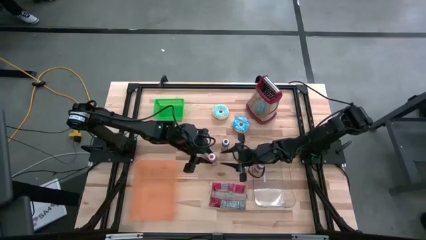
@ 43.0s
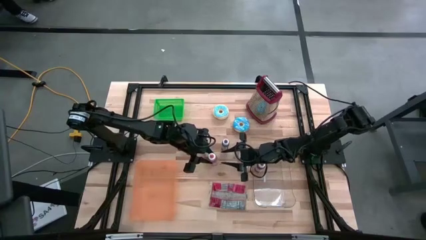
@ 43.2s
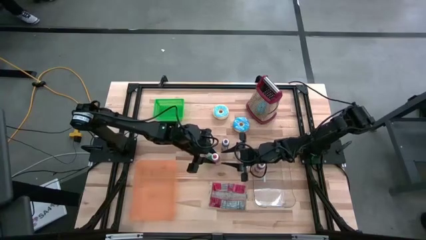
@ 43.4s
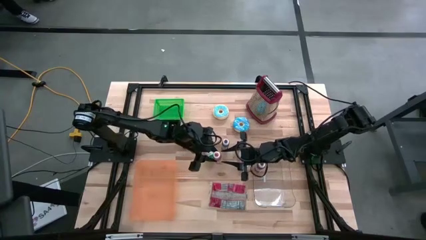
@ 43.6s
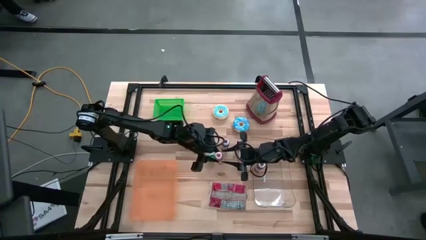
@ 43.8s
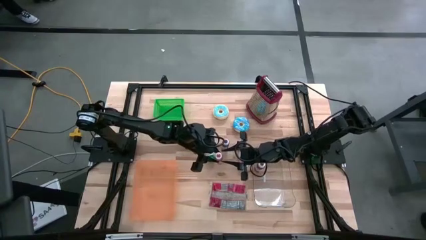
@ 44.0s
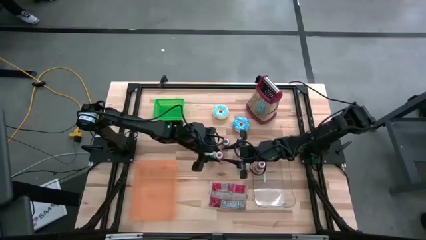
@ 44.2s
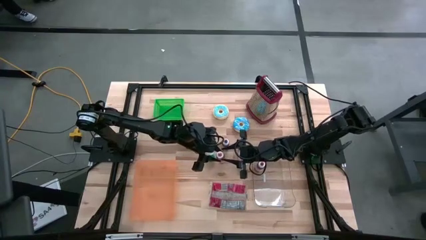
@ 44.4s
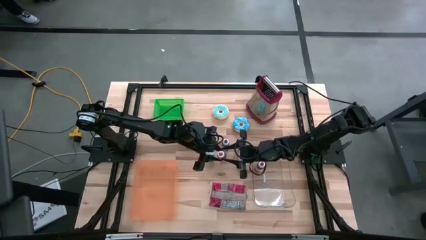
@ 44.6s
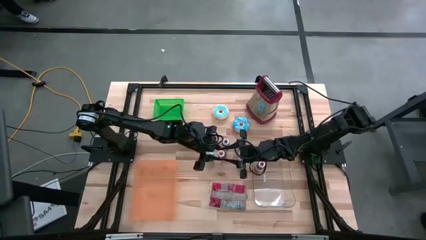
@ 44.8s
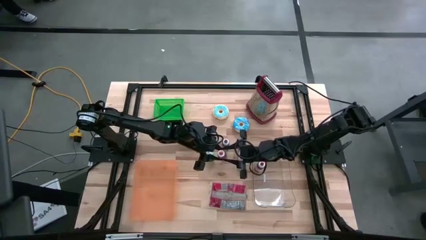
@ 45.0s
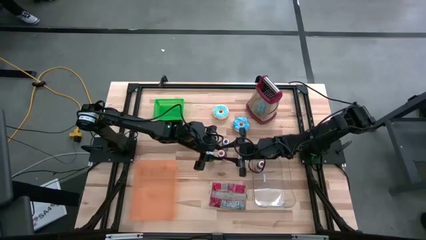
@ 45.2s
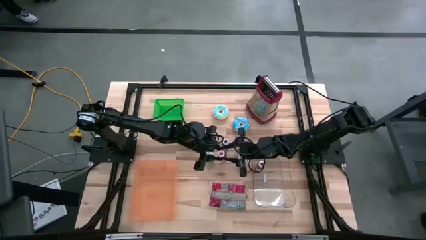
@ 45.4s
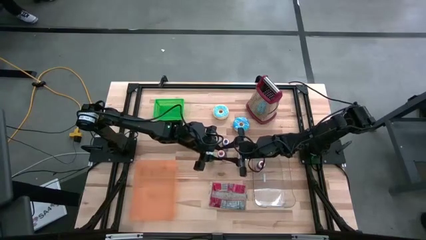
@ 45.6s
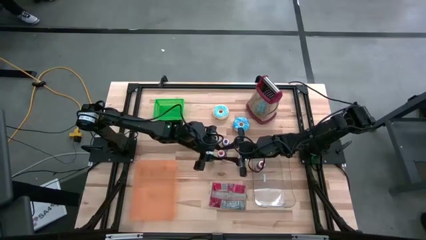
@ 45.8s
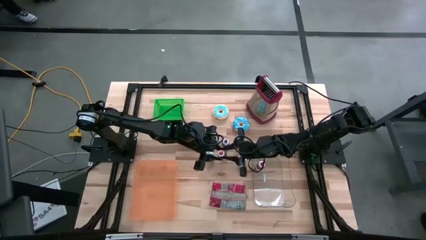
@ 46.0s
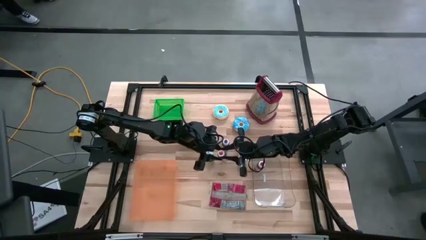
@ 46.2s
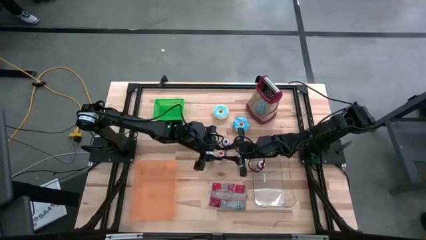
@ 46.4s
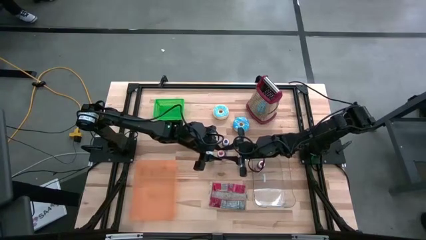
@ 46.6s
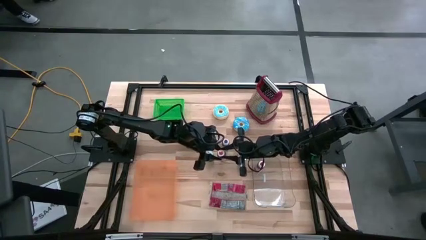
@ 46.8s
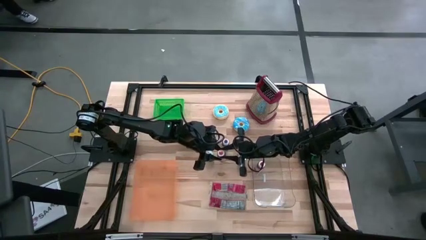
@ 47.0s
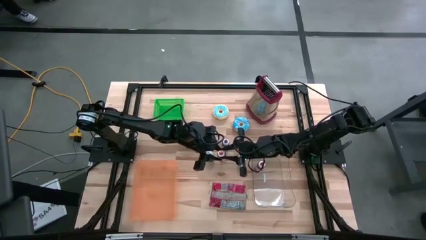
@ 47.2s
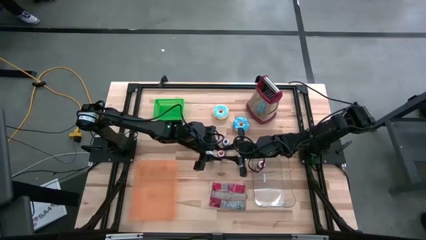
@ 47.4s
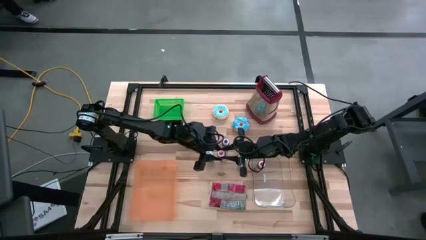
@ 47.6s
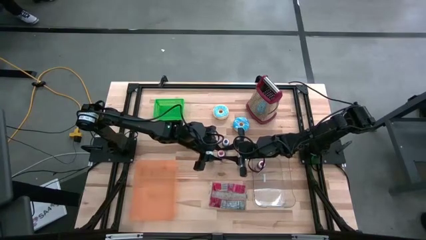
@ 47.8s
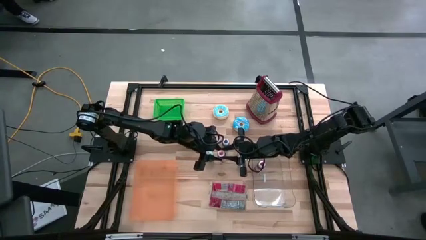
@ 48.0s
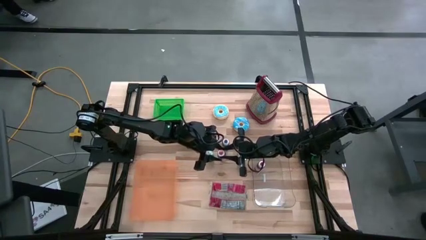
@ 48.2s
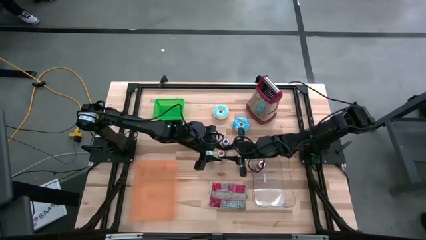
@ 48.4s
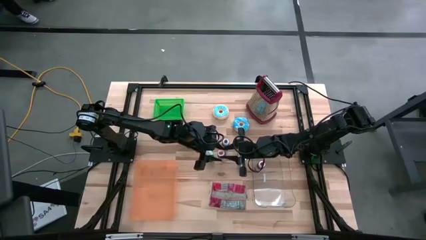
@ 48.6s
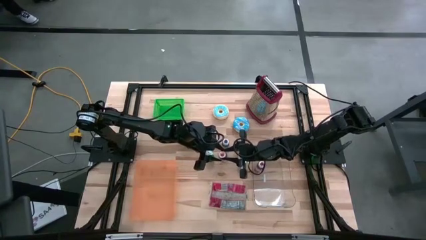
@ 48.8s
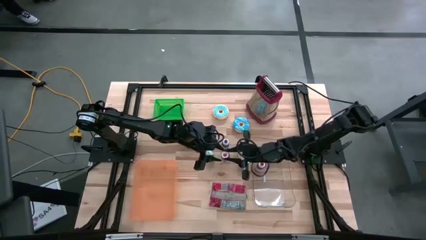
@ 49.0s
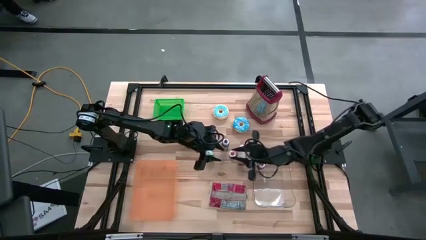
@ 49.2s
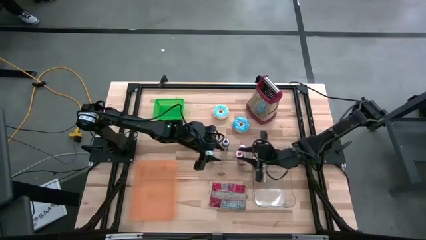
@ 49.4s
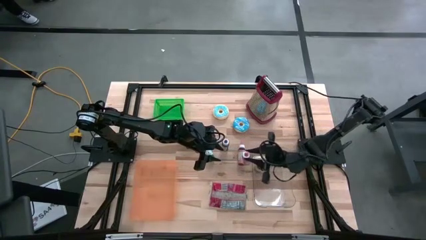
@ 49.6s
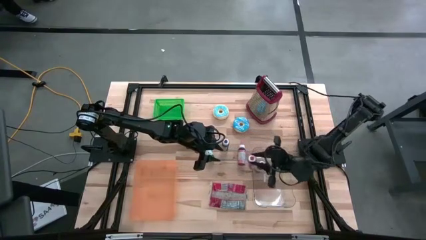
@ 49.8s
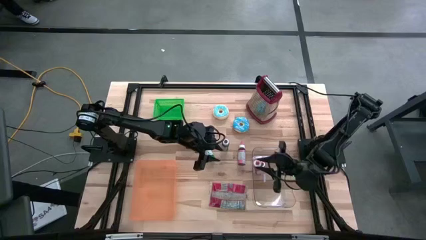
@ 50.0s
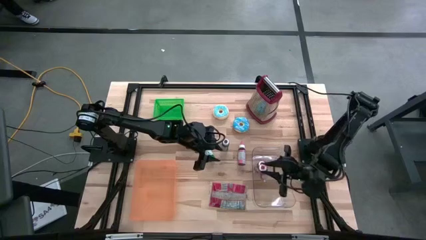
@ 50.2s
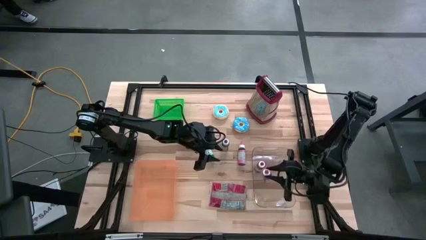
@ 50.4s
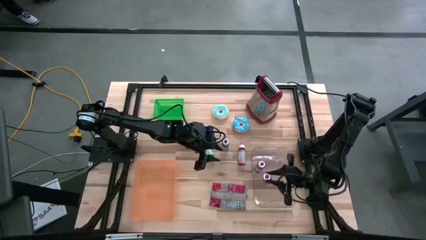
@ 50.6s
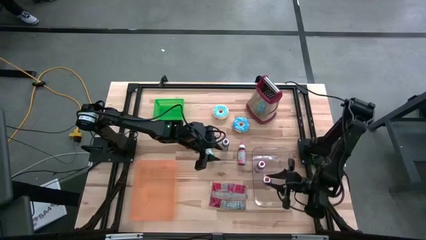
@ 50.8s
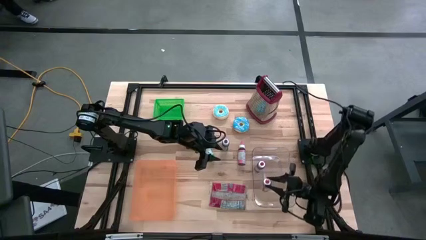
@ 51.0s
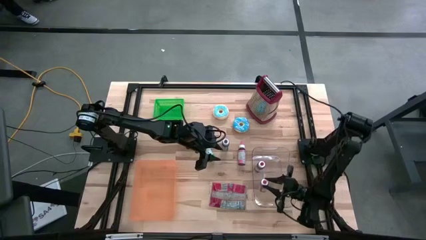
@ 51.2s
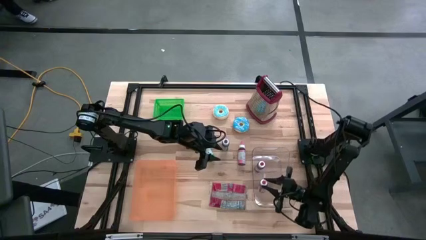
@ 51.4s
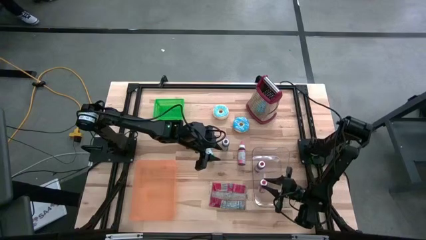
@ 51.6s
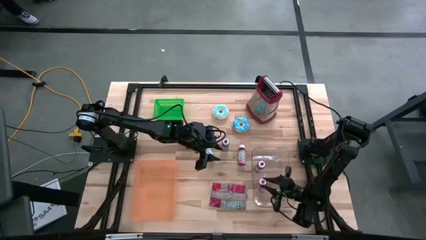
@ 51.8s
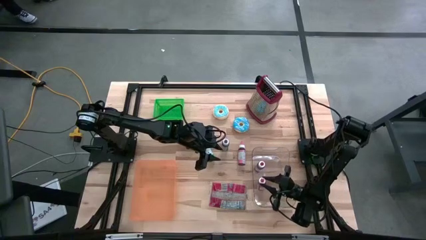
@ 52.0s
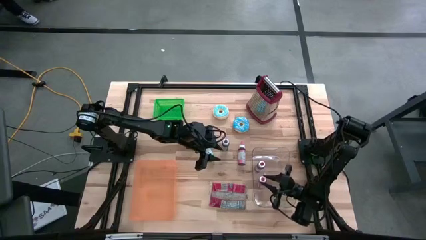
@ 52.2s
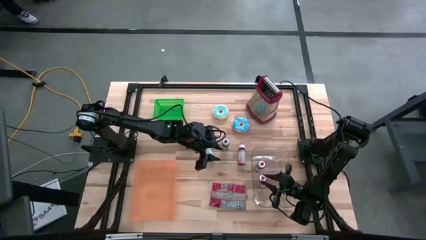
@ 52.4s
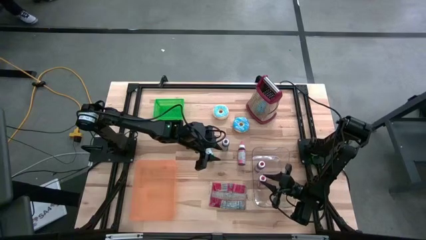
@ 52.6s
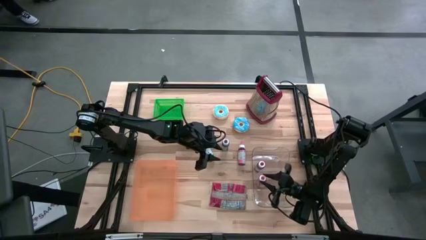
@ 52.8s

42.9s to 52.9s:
Put the orange paint bottle into the transparent bin

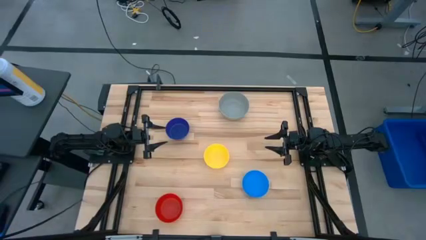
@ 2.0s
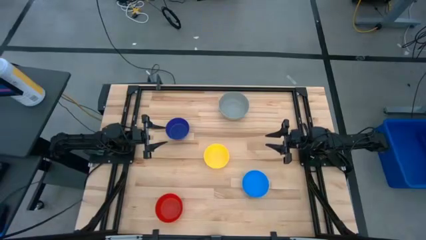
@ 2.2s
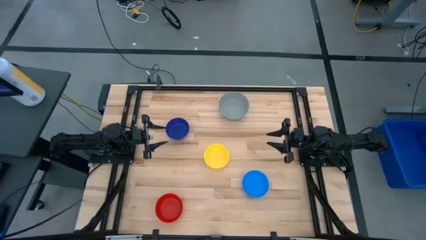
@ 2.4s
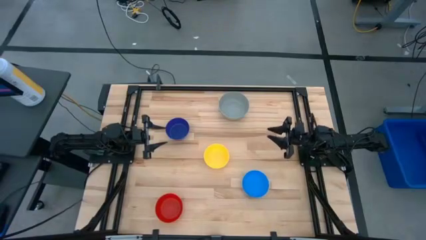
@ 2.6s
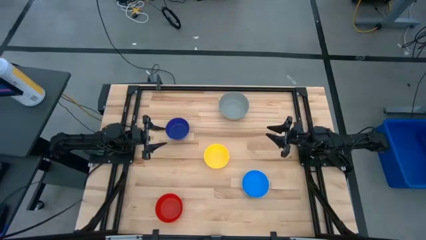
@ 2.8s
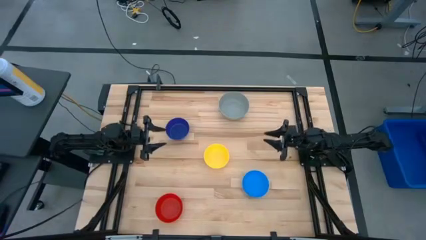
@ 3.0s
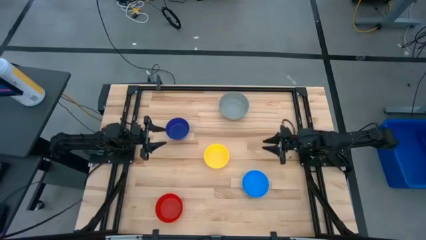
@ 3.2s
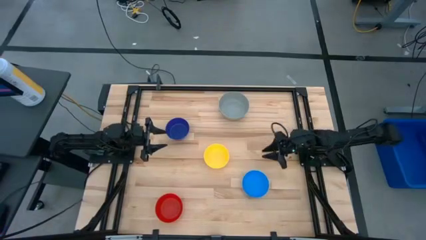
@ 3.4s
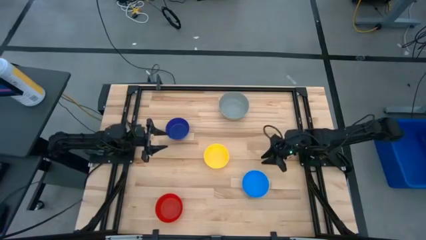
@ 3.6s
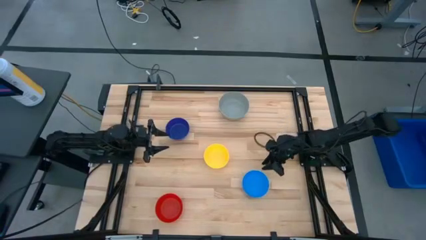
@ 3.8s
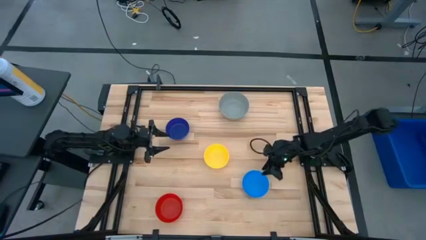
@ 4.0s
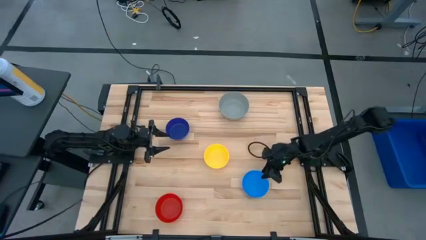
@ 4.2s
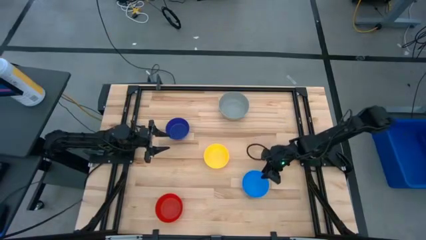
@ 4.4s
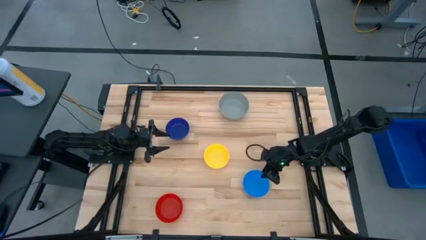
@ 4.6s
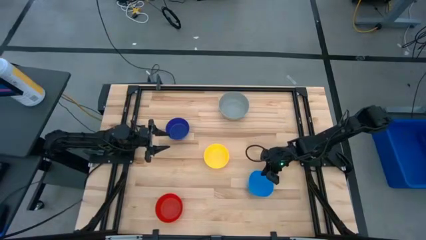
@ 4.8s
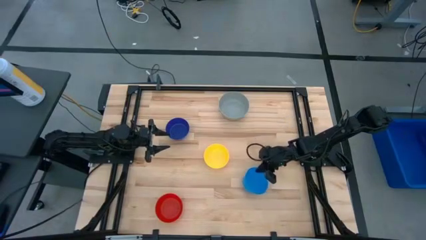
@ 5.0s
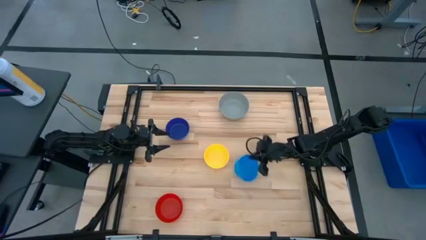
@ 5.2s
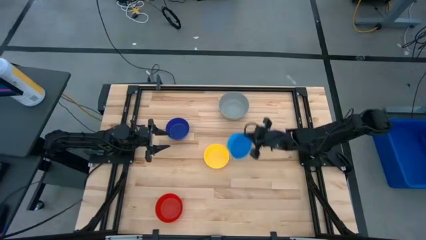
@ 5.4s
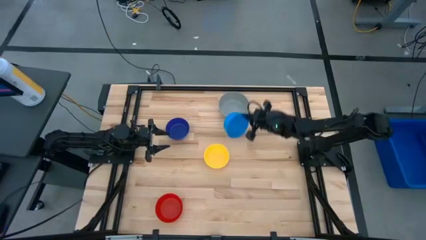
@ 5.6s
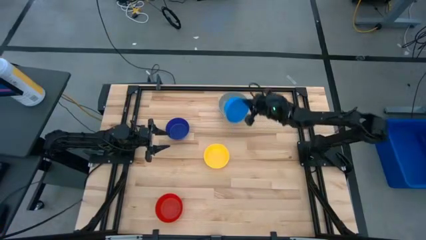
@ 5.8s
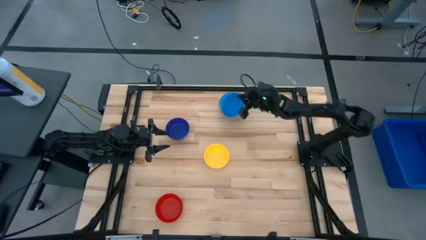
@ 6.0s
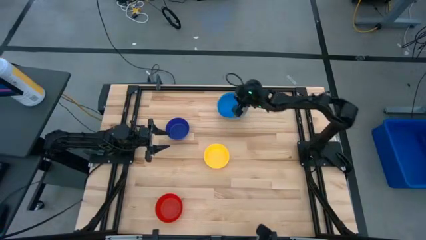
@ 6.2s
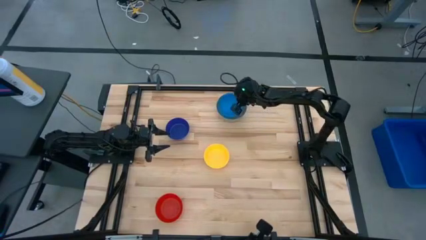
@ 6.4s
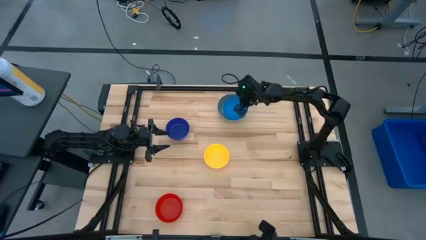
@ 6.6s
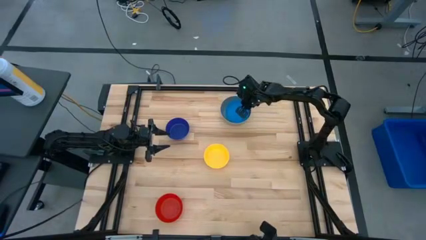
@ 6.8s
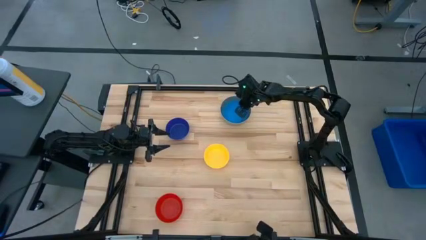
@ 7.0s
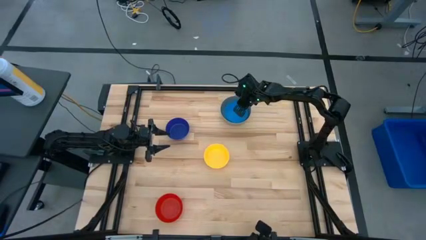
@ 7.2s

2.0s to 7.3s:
Stack the blue bowl on top of the grey bowl
